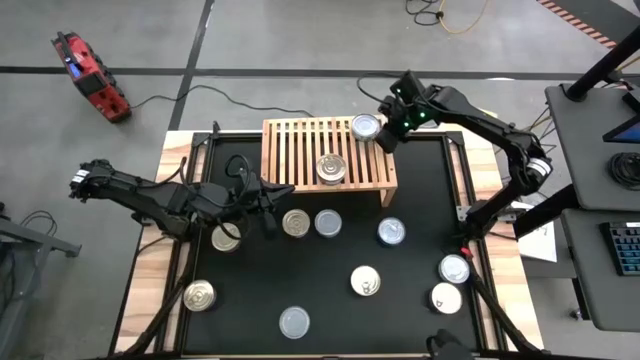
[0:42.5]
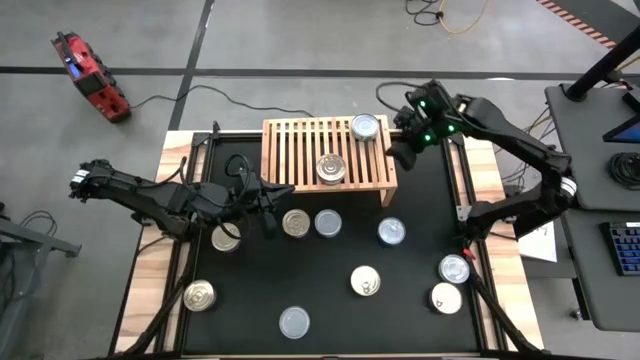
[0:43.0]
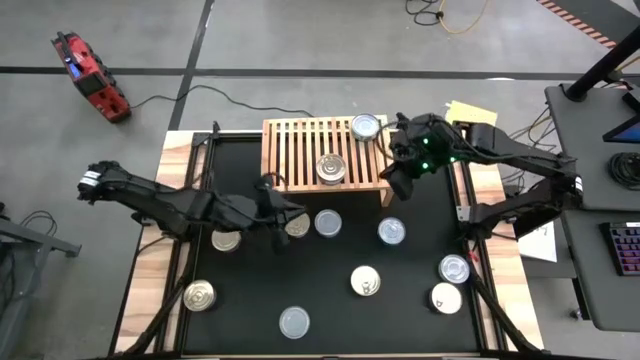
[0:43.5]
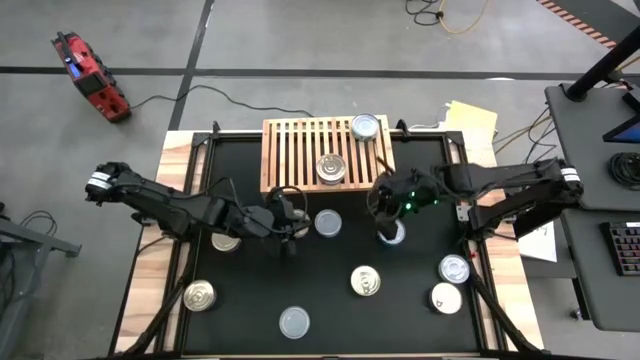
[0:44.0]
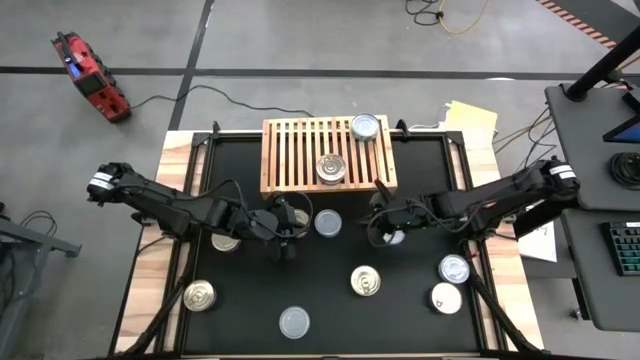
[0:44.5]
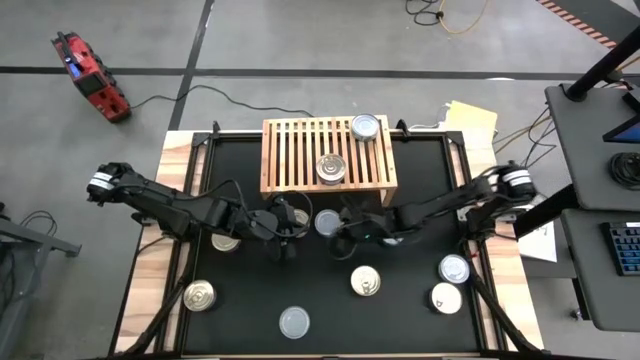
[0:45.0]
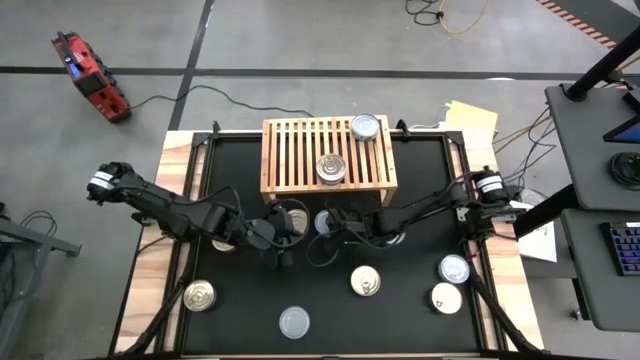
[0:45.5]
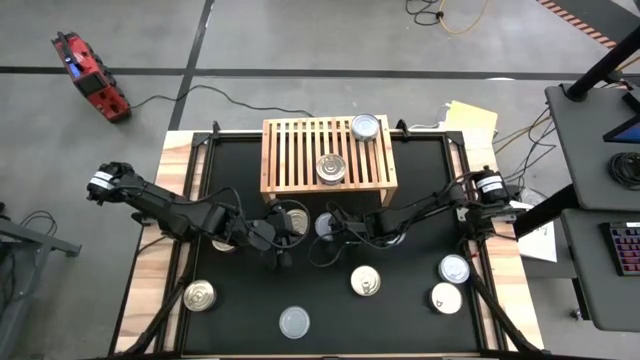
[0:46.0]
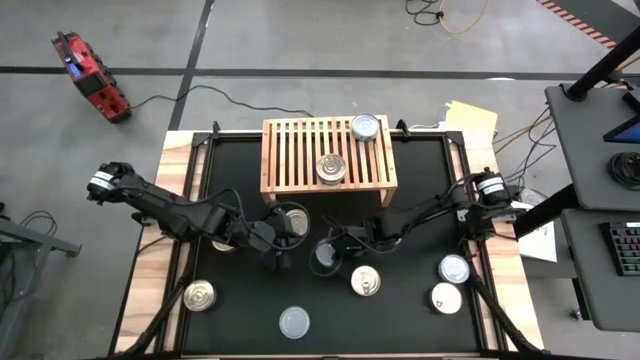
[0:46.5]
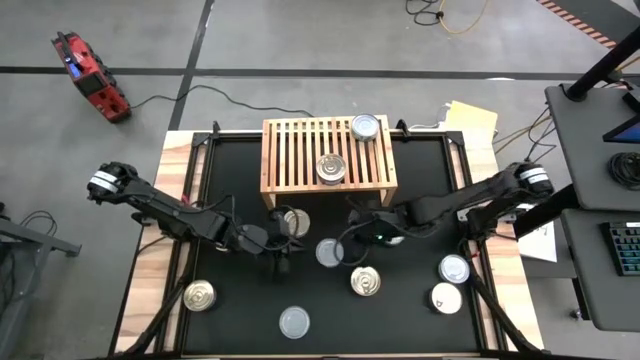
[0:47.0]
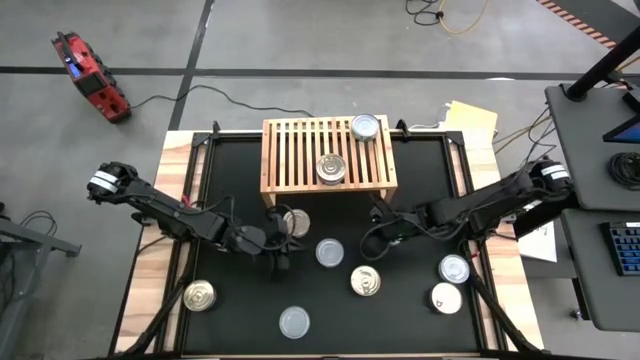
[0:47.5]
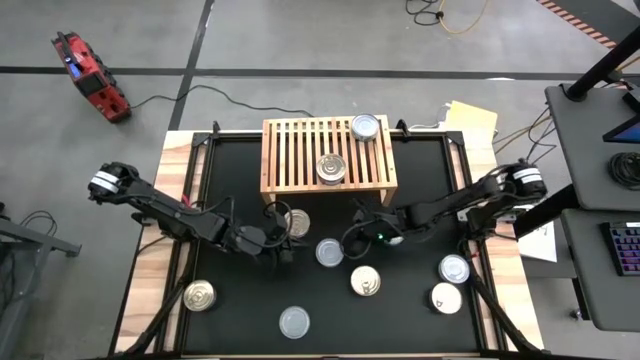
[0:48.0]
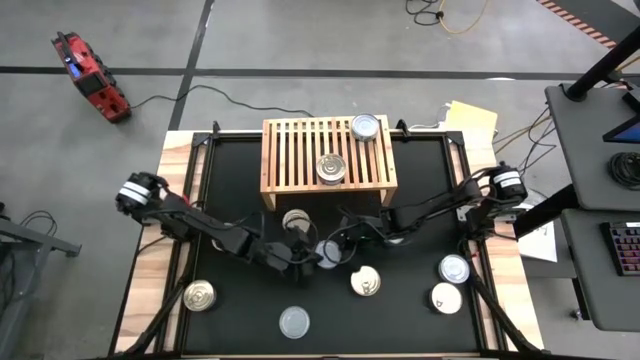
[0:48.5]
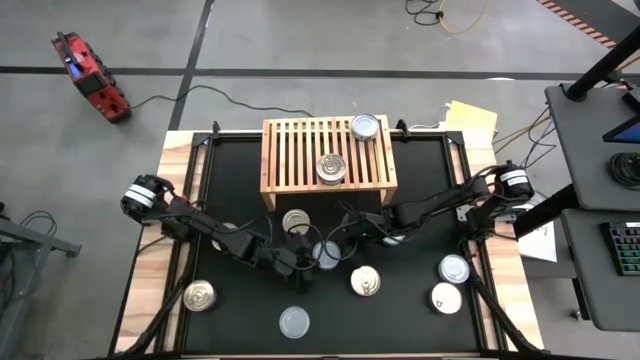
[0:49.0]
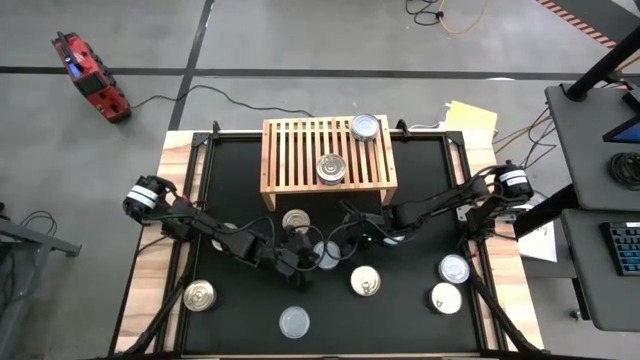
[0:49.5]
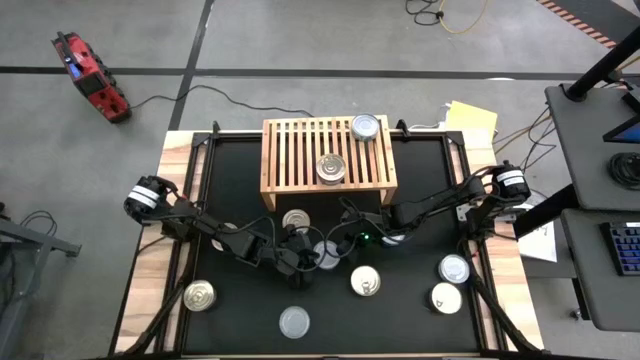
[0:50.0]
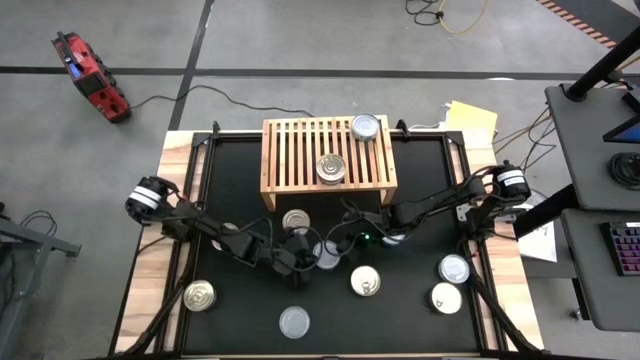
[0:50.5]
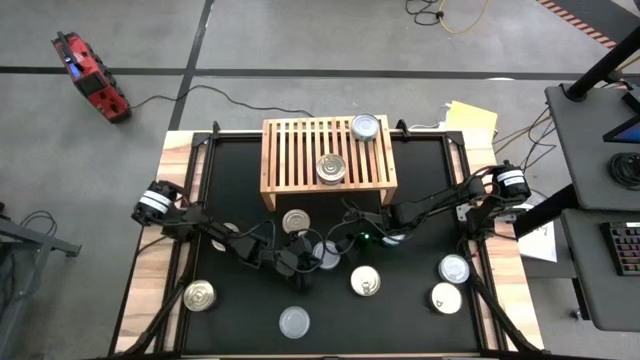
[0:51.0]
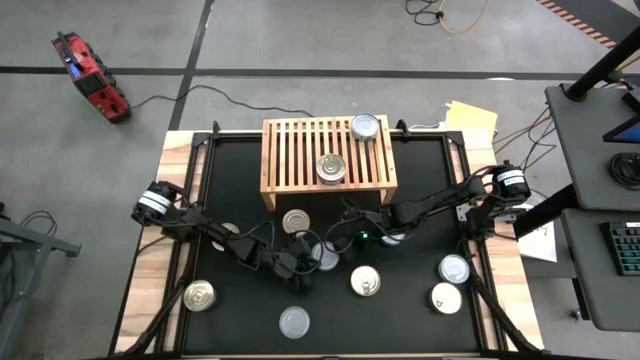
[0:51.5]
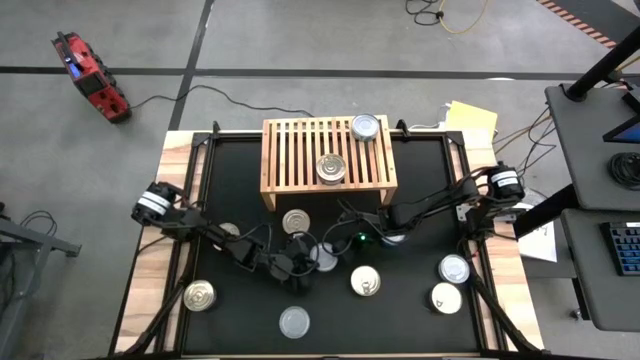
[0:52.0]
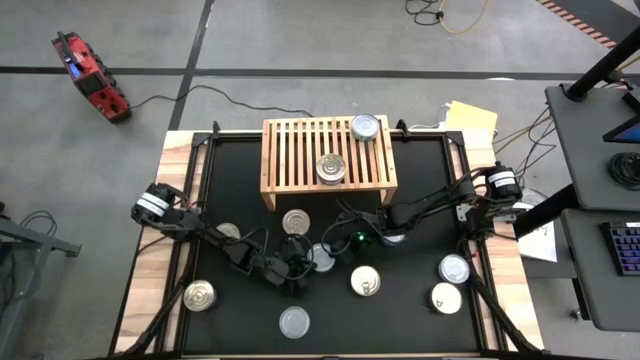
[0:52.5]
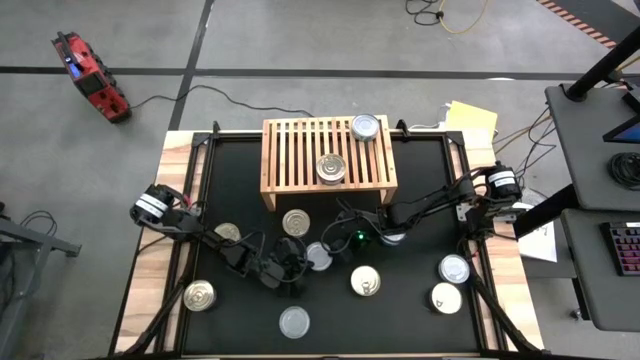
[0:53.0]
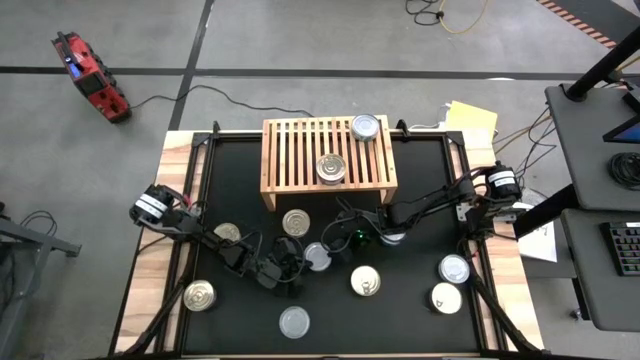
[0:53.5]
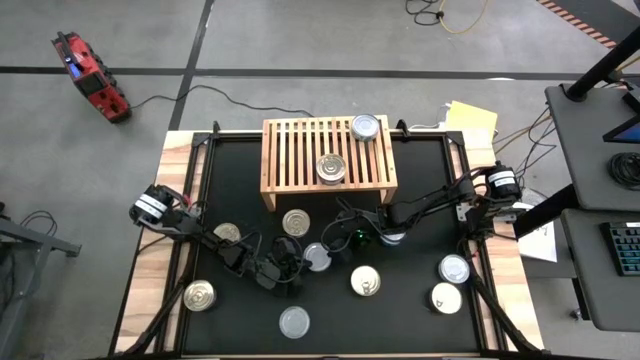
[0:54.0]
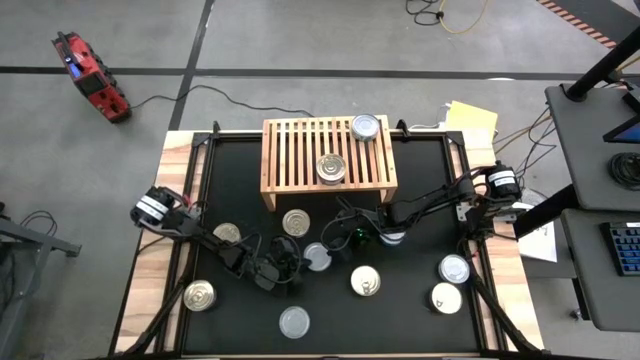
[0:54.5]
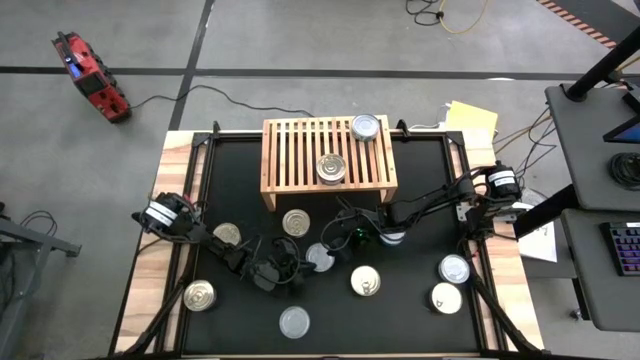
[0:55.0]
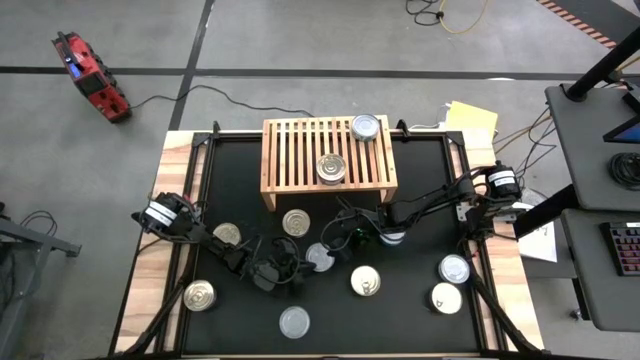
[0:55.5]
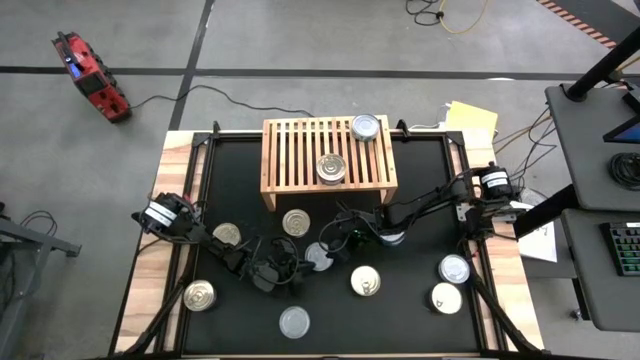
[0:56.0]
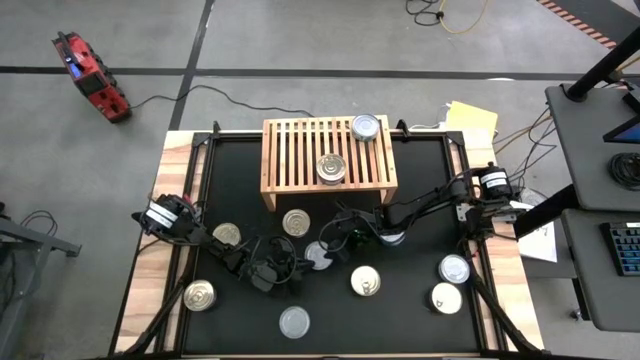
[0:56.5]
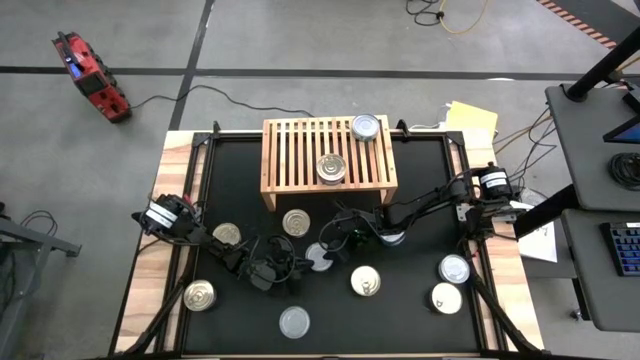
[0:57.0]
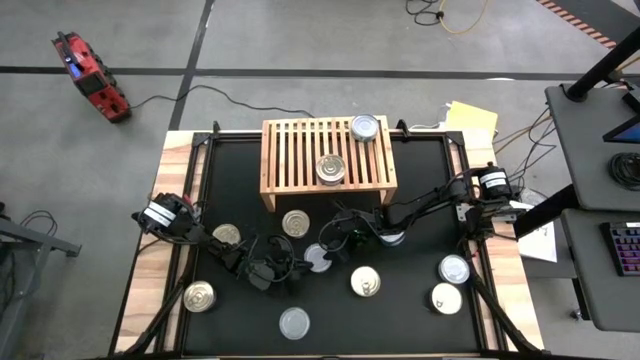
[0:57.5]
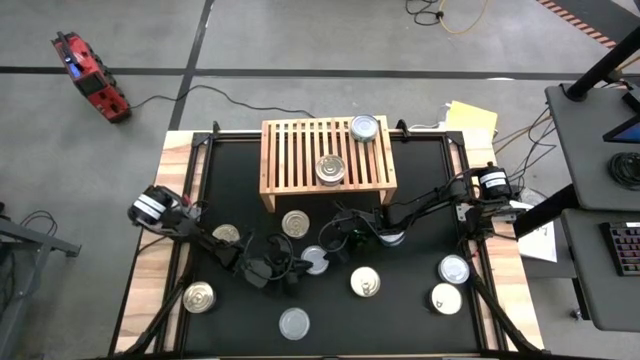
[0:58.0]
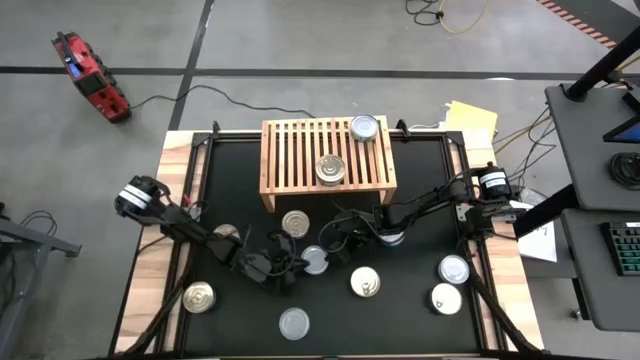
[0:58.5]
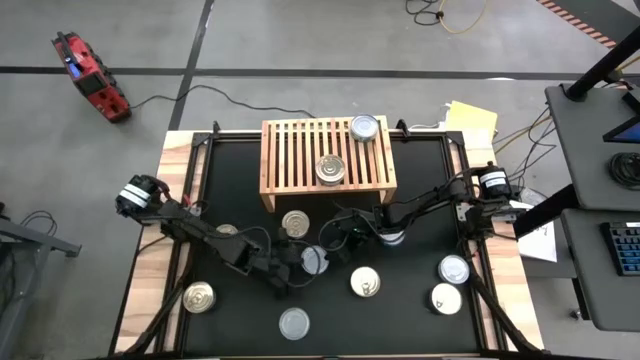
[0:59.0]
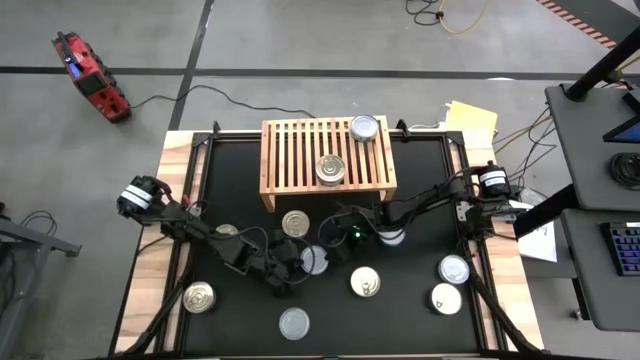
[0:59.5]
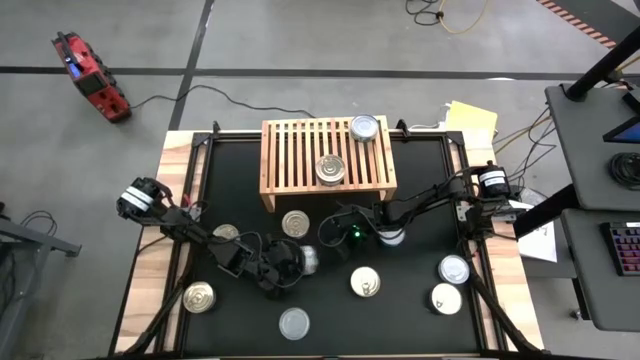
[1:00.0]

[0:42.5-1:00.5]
Task: Stack canned seafood by type on shelf
Stack the green white tuna can on top of the green white tuna can on the shelf

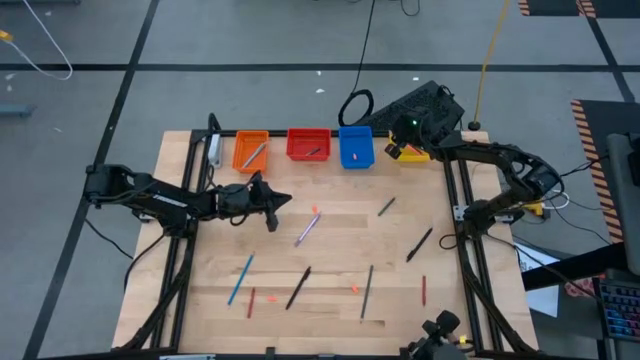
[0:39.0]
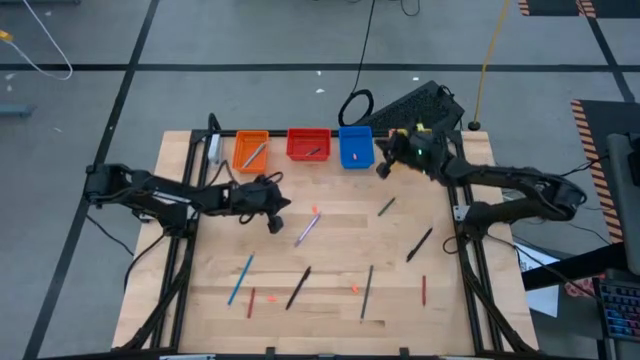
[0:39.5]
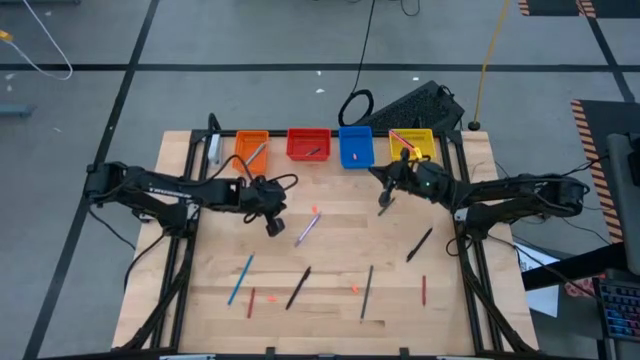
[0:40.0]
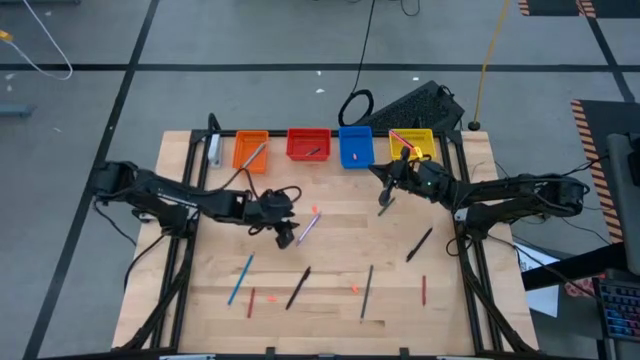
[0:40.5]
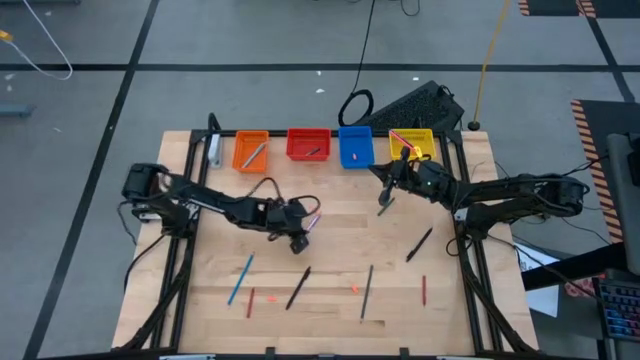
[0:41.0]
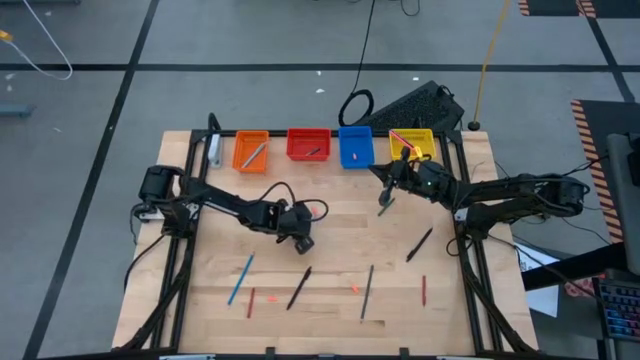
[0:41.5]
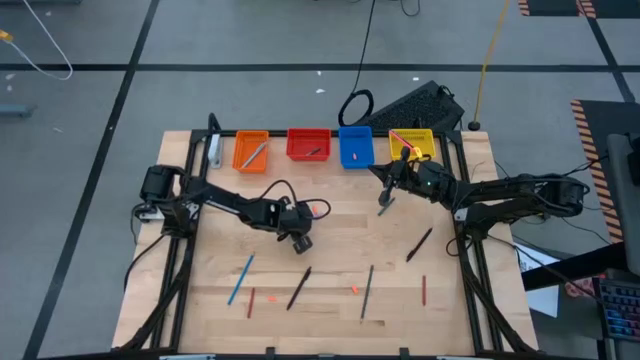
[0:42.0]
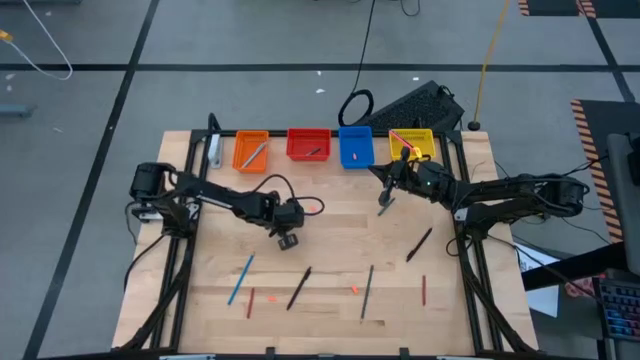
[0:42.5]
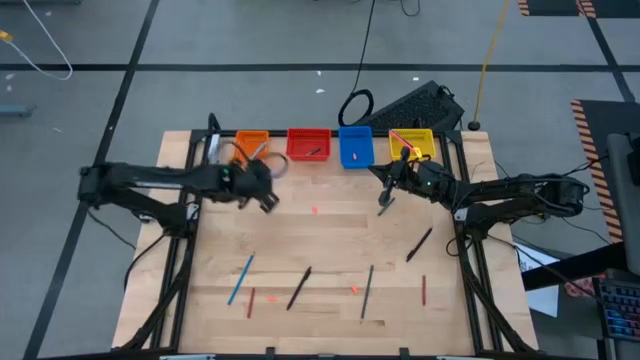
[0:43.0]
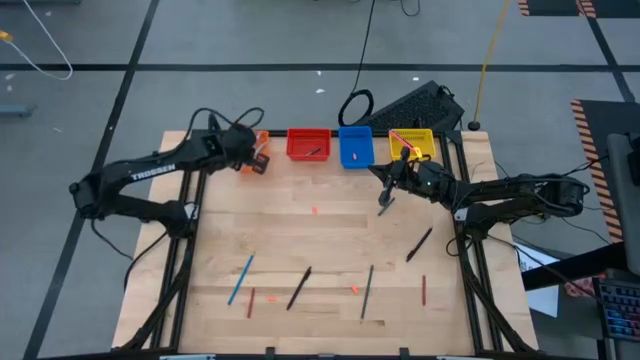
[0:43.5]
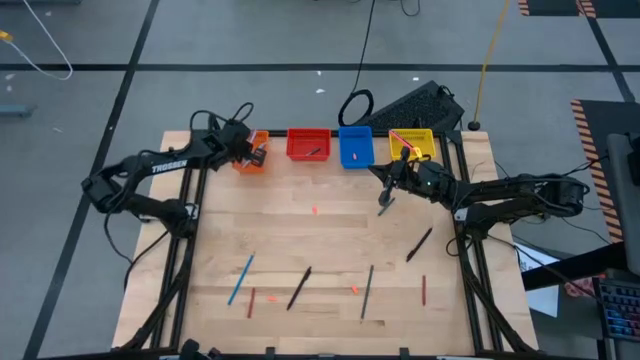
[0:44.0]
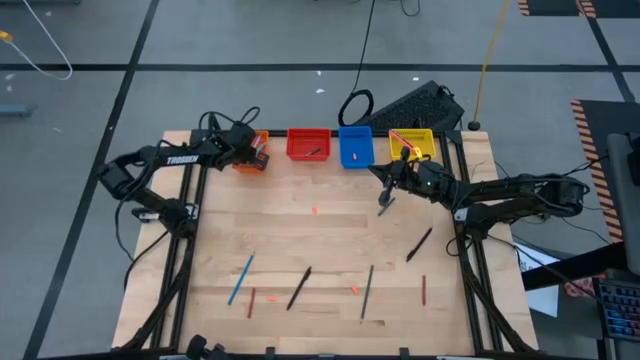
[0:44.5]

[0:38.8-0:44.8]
Task: Sort crayons/erasers/pens/pencils in bins
Put the purple pen into the orange basket
